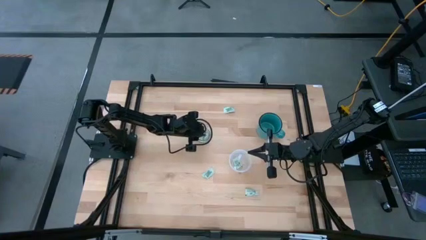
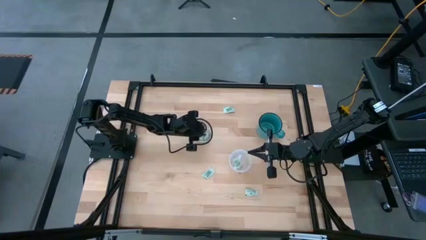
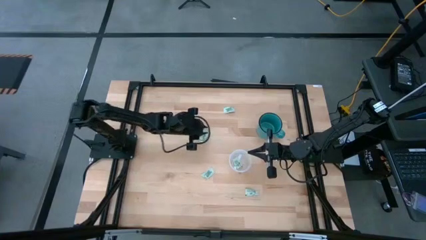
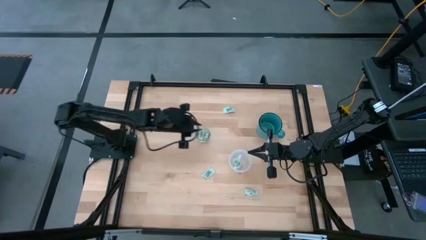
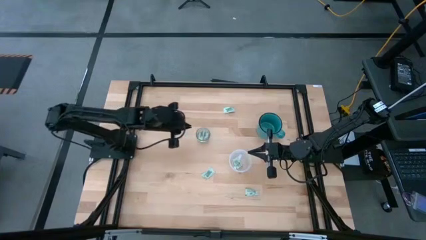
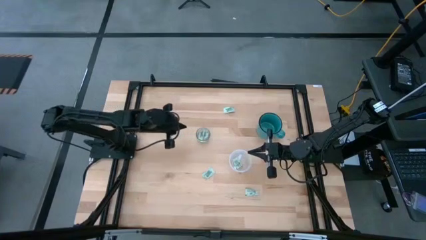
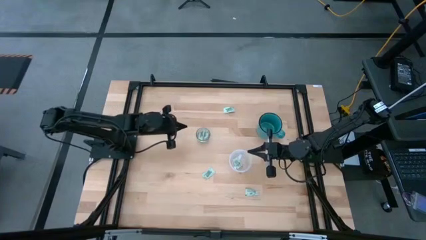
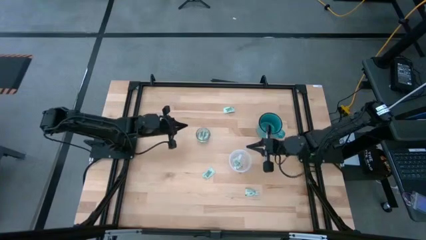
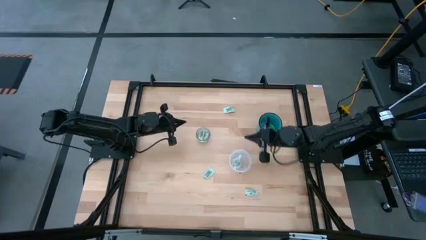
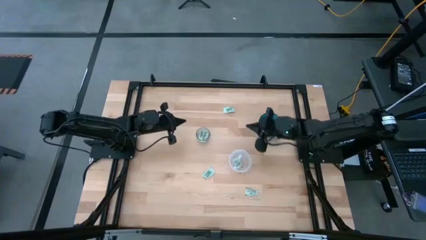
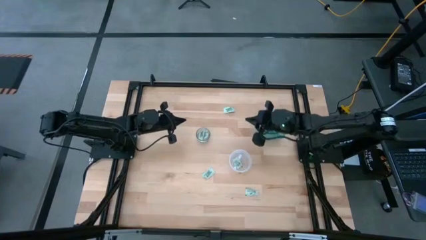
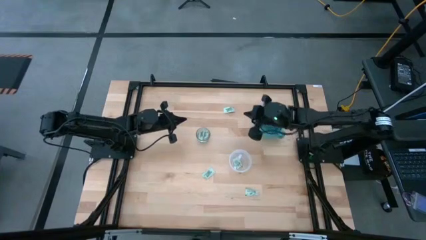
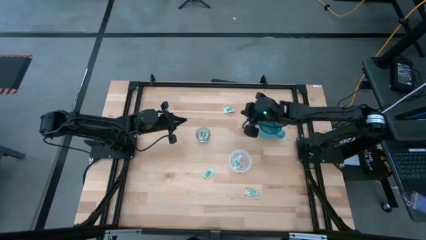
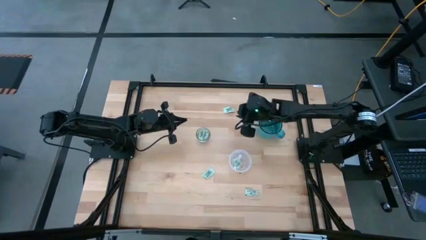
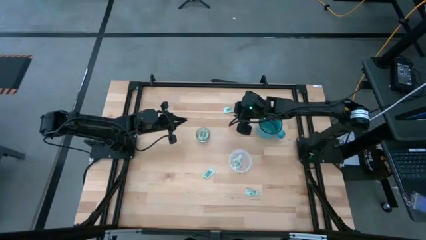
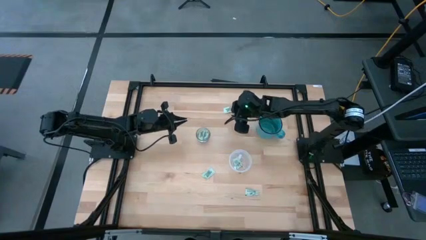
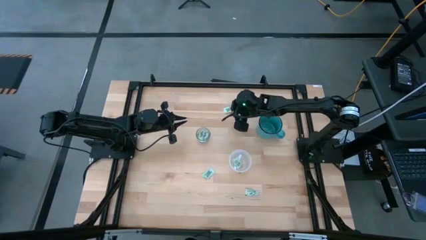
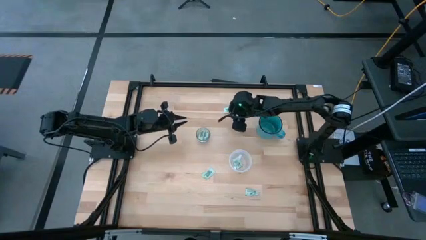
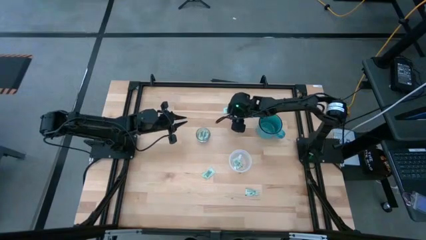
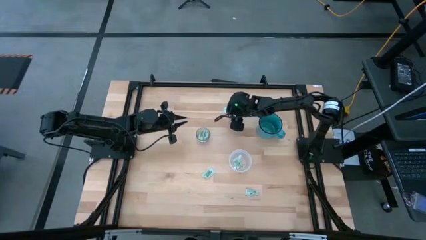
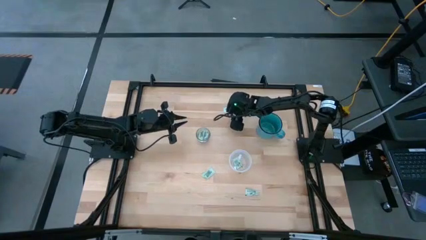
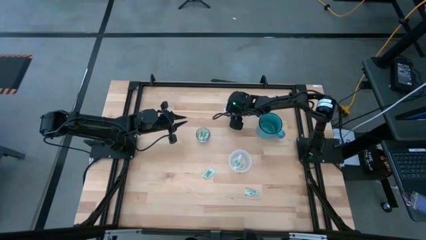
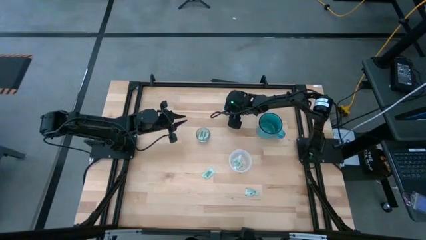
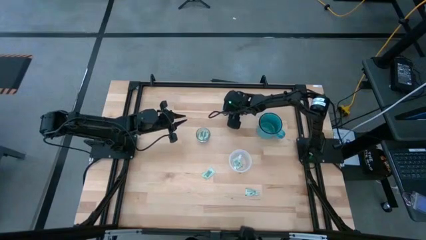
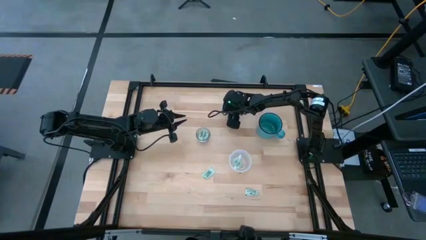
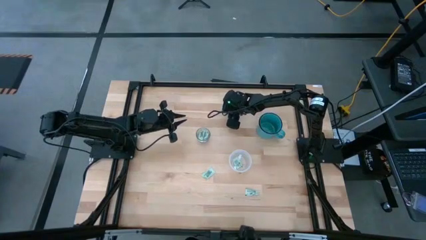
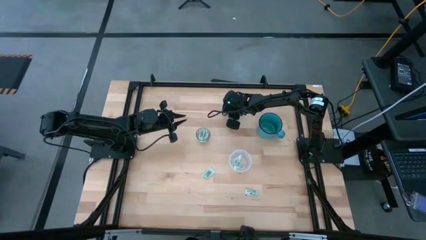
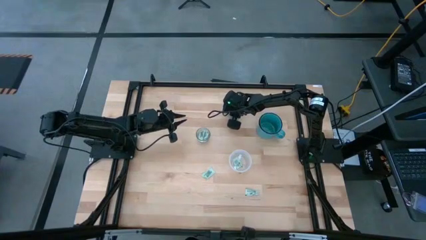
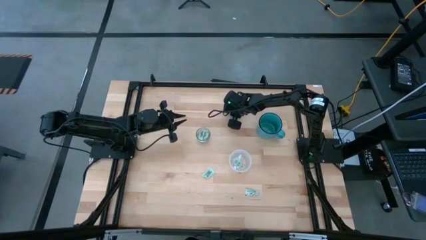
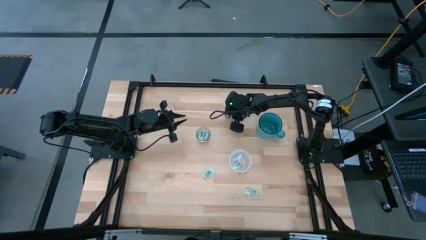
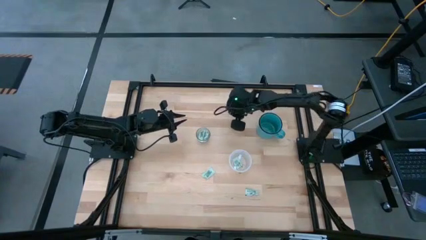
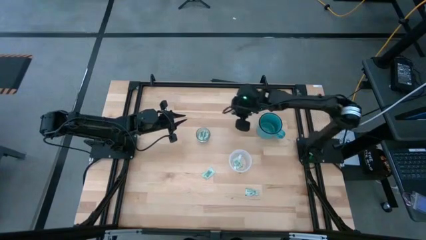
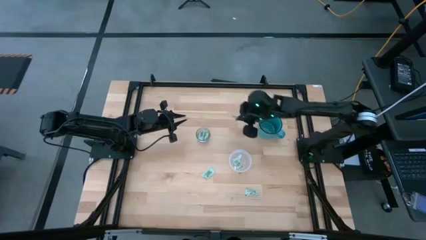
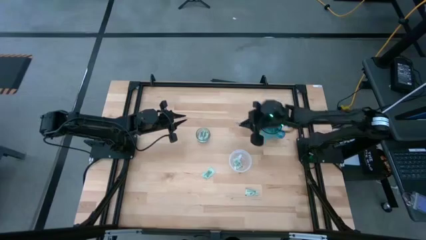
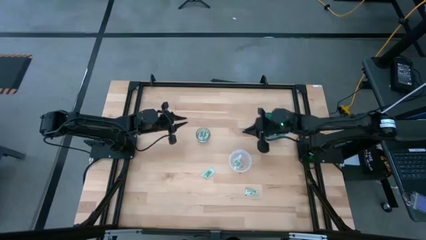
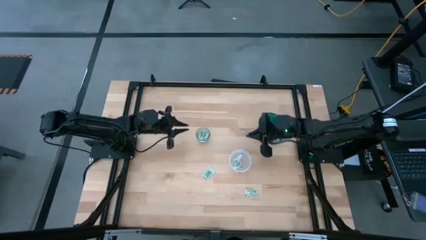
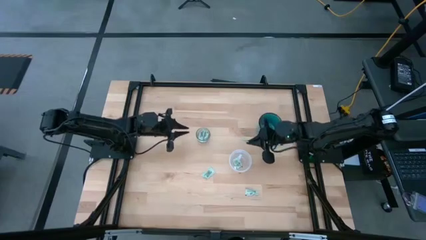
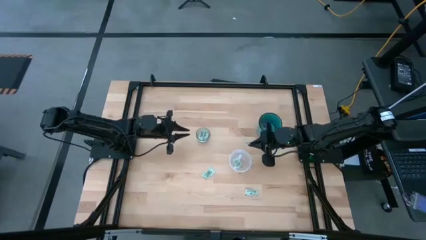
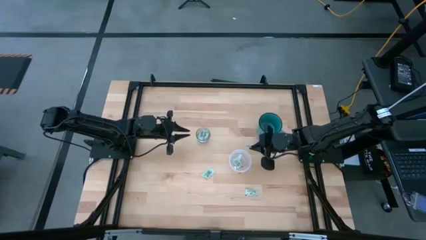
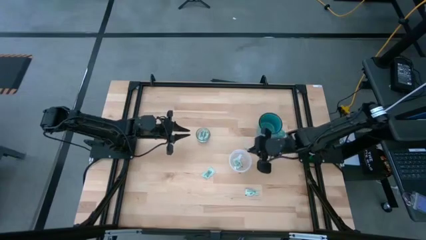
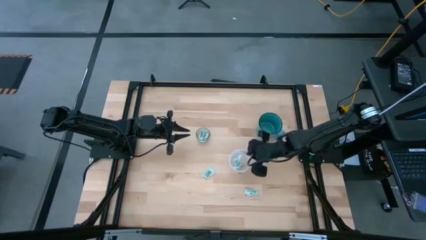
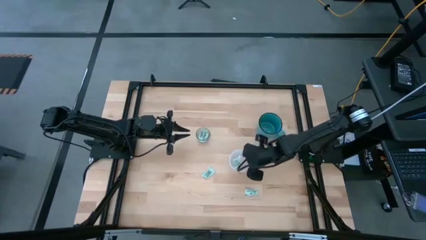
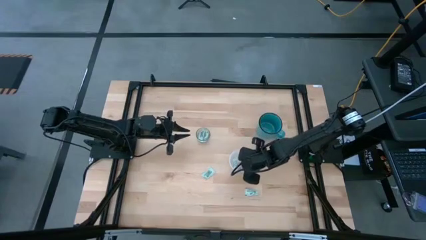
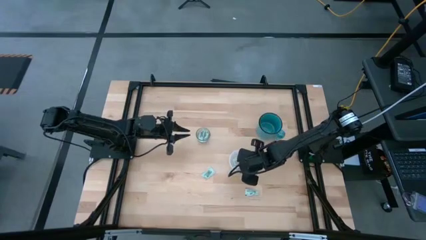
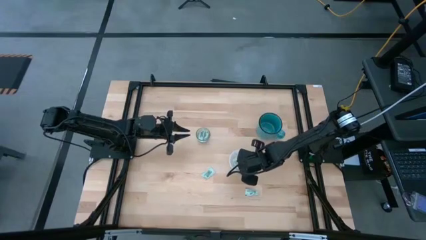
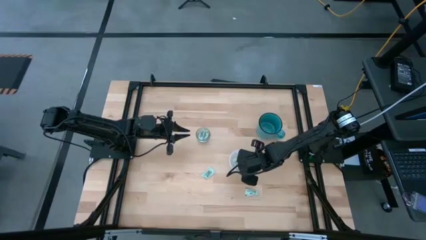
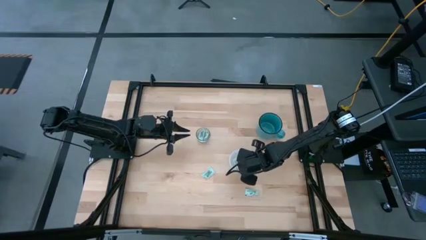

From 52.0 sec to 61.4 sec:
Task: Pick and place Stevia / Truvia into bins
Put the stevia packet into the transparent container

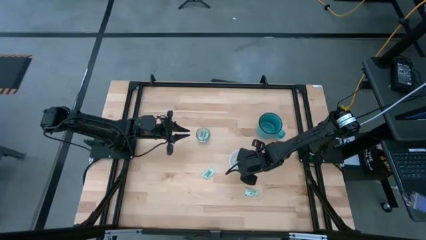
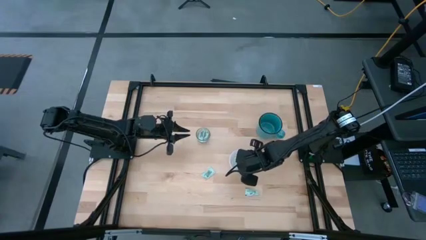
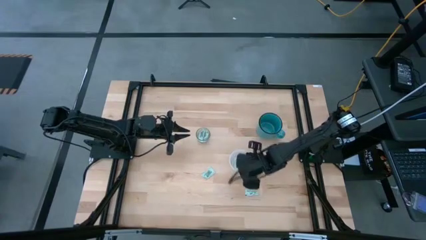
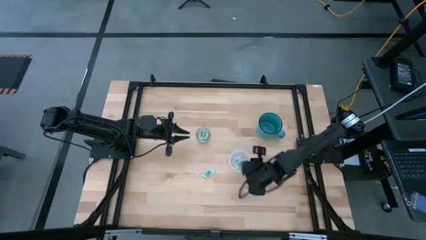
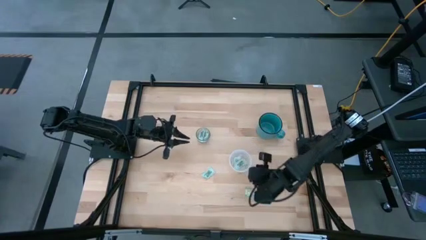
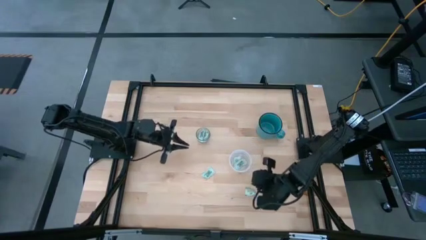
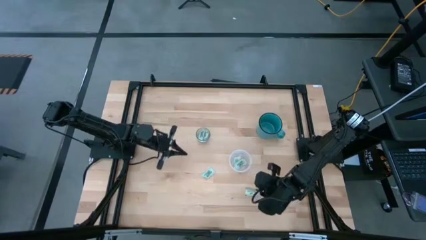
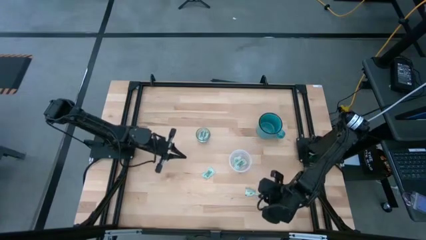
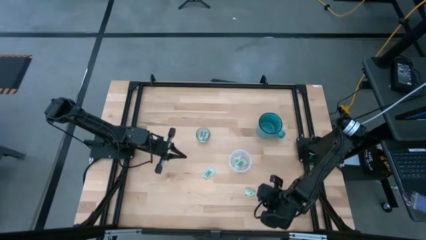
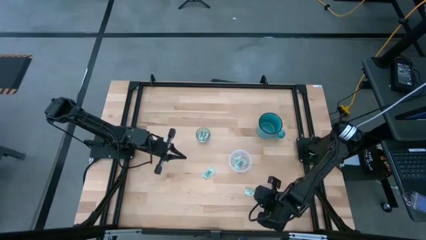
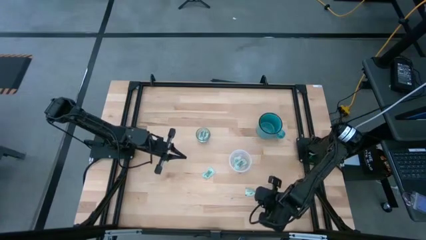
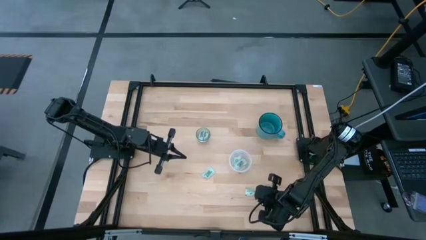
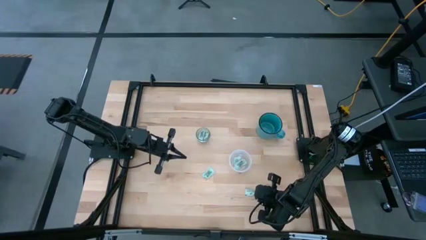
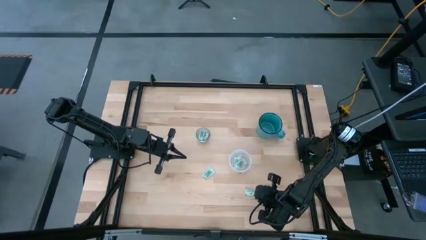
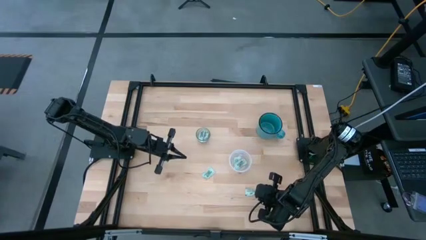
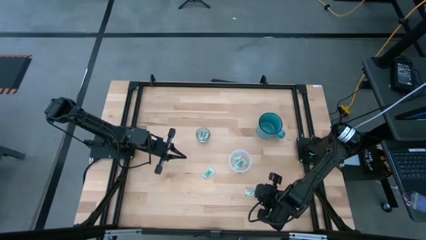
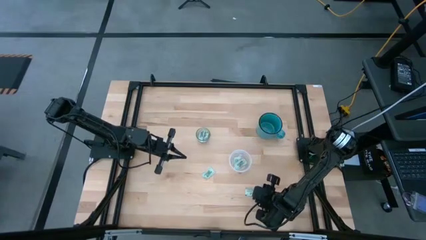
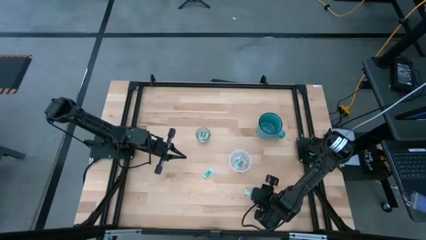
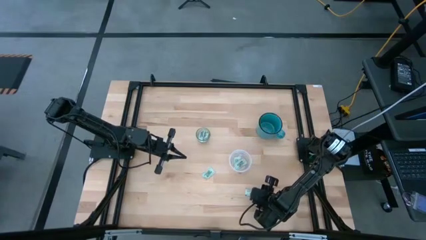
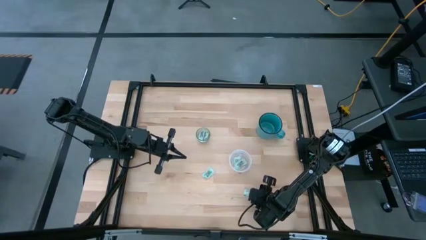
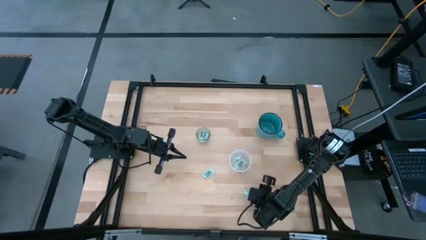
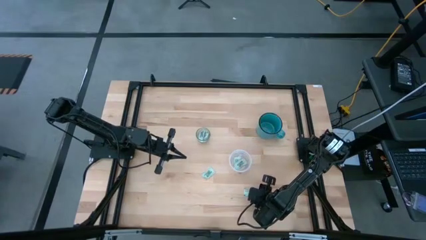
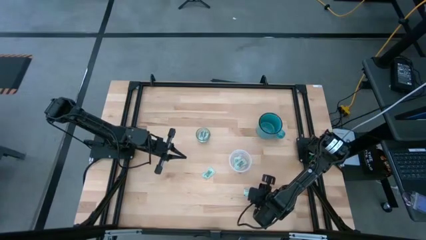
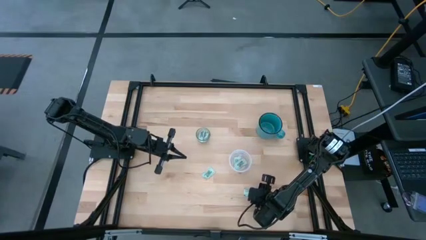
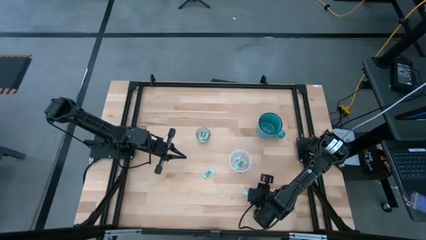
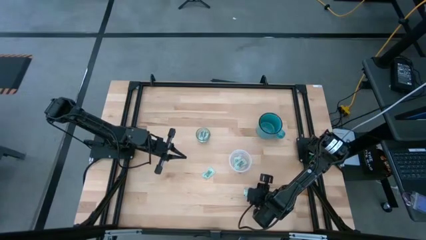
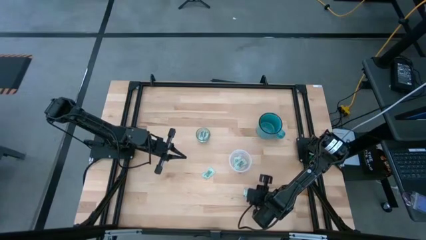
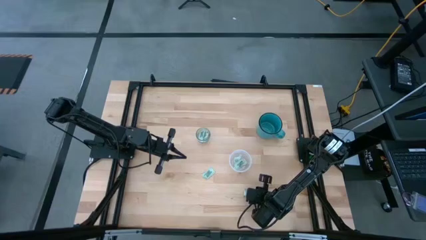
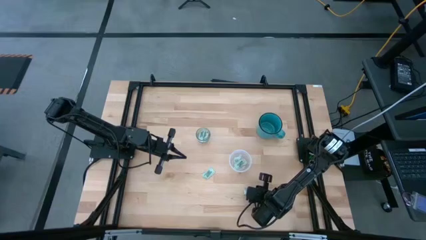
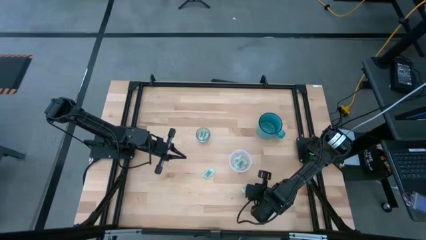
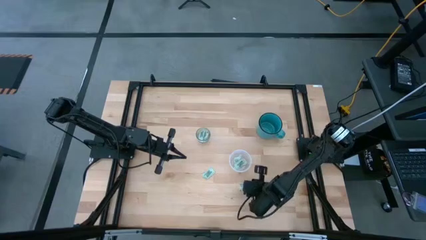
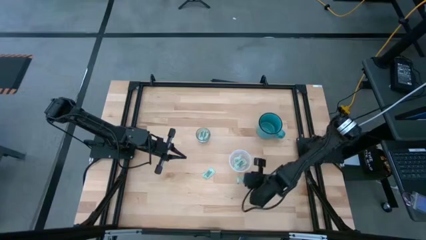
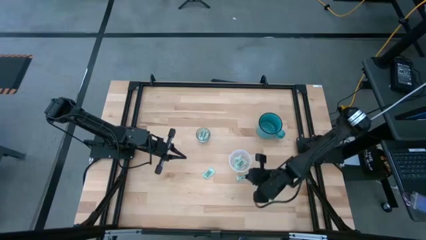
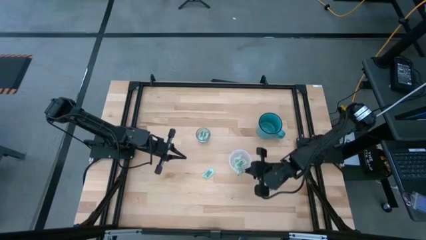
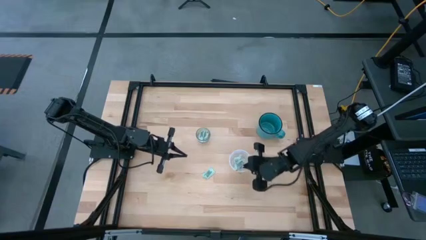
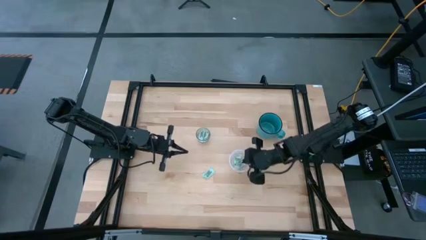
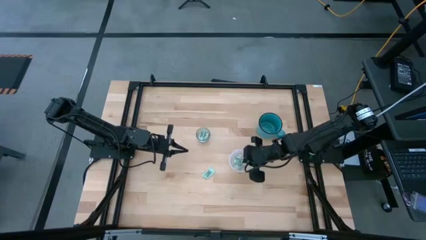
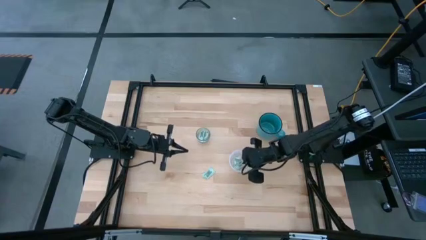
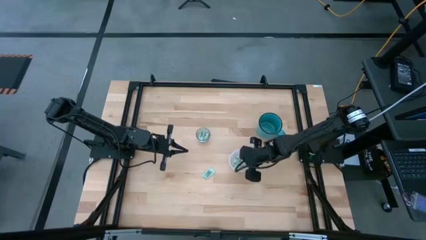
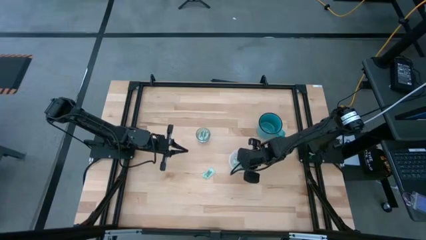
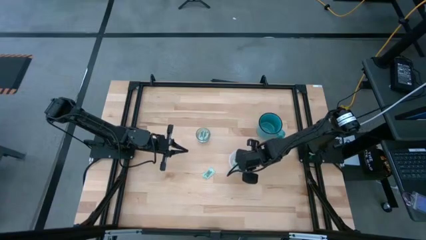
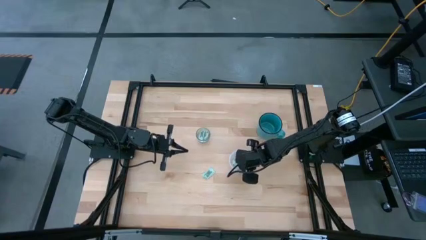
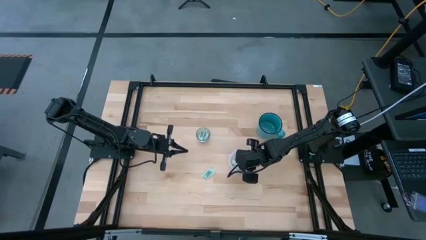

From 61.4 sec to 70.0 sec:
Put the stevia packet into the transparent container
